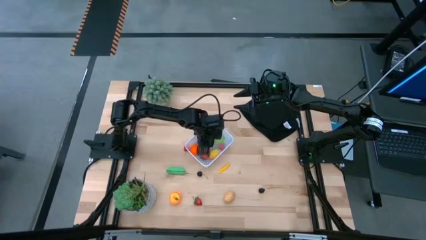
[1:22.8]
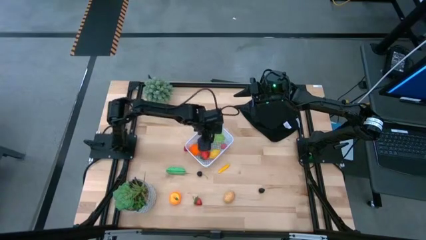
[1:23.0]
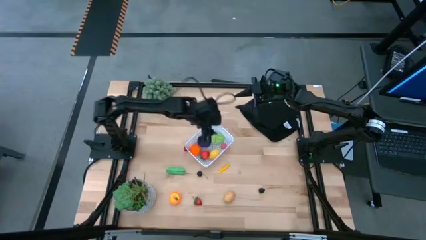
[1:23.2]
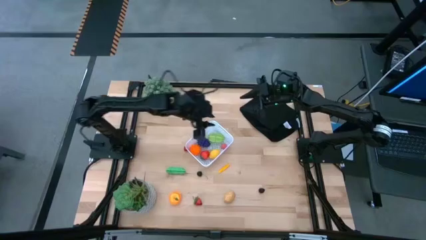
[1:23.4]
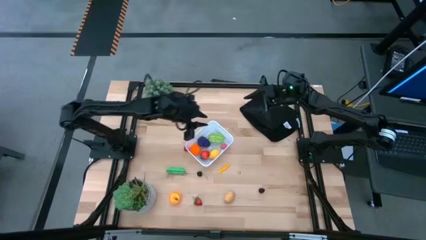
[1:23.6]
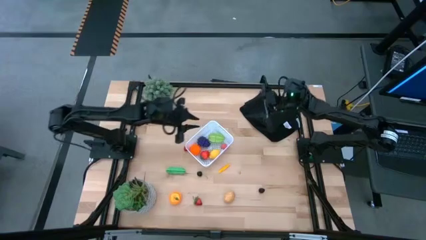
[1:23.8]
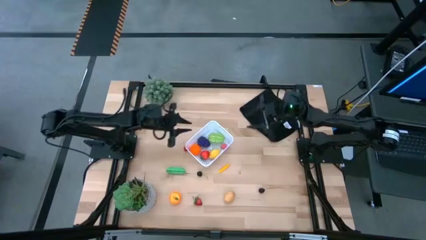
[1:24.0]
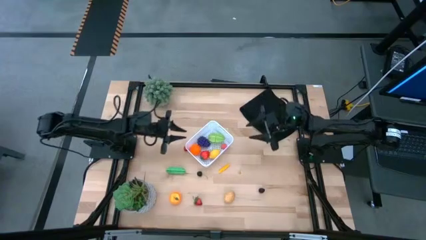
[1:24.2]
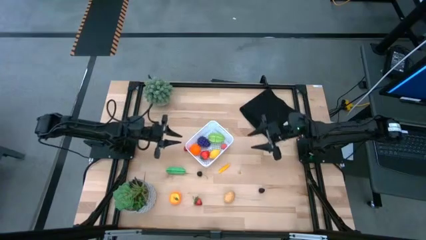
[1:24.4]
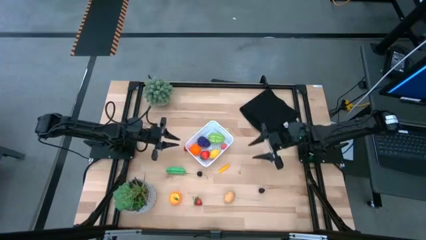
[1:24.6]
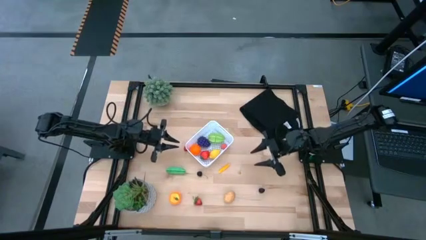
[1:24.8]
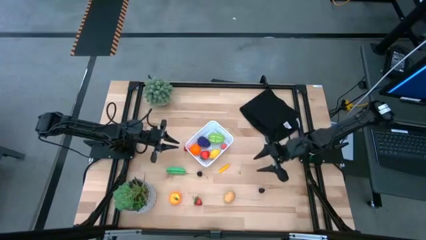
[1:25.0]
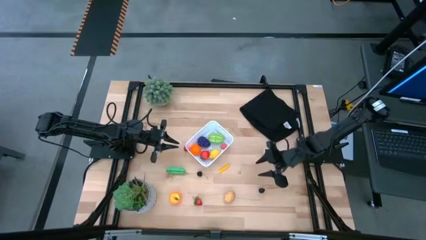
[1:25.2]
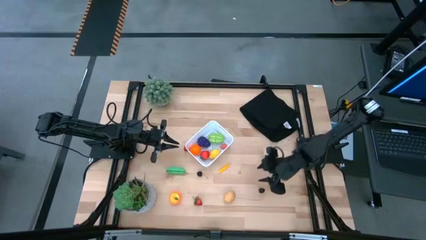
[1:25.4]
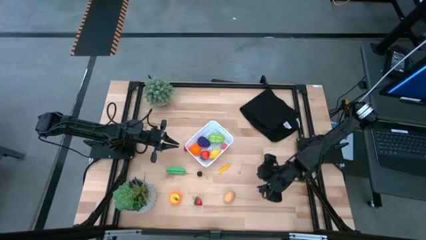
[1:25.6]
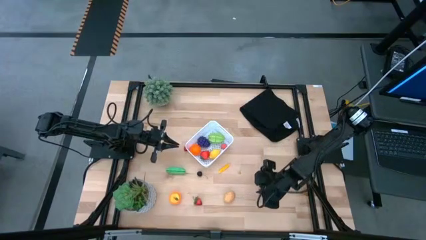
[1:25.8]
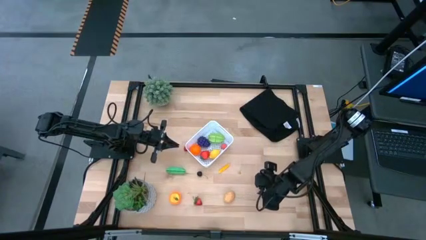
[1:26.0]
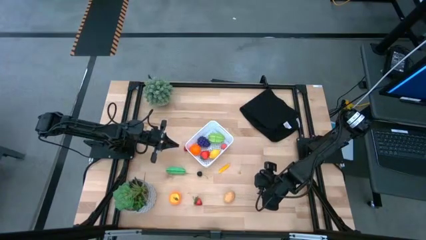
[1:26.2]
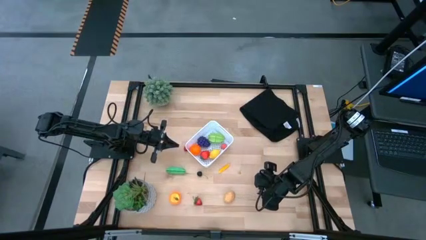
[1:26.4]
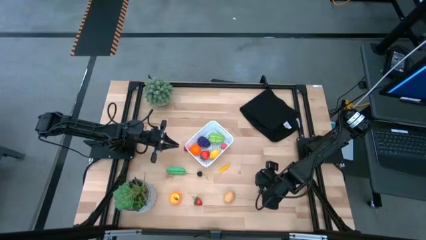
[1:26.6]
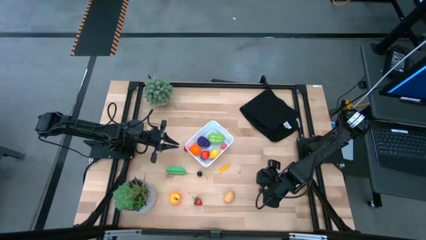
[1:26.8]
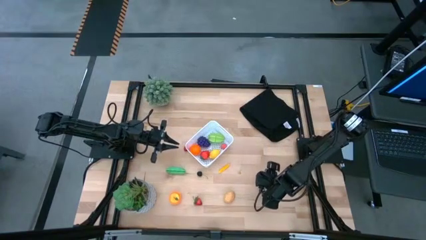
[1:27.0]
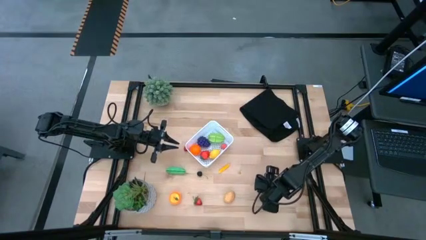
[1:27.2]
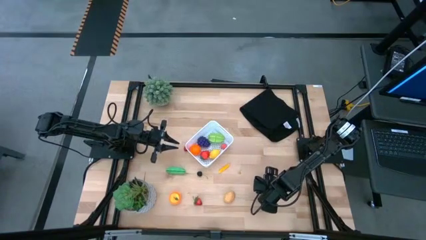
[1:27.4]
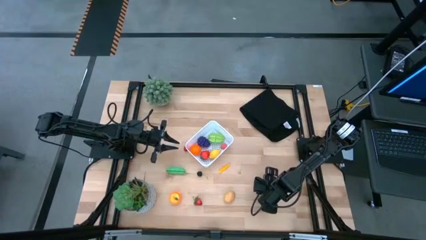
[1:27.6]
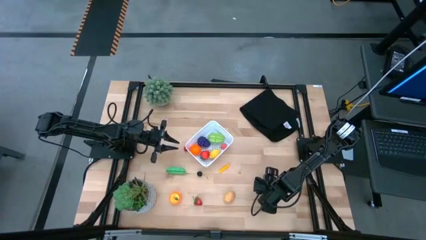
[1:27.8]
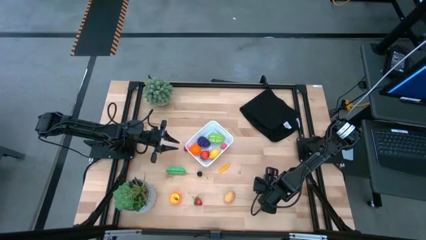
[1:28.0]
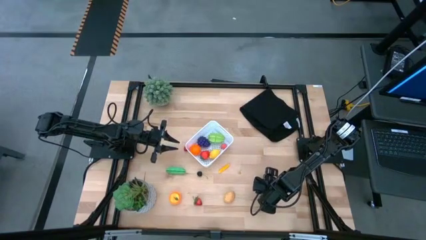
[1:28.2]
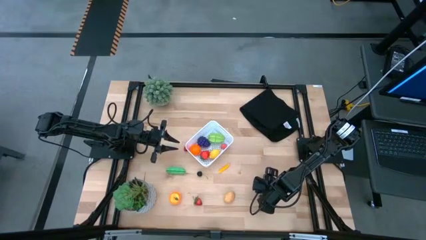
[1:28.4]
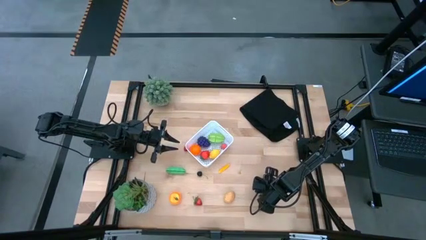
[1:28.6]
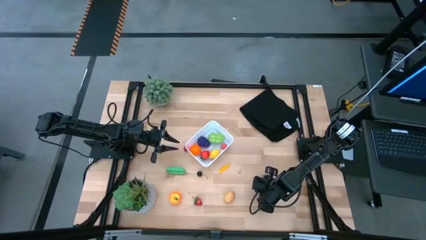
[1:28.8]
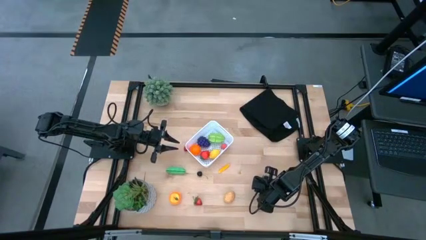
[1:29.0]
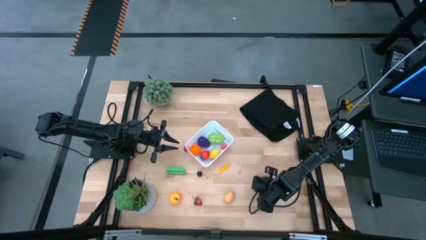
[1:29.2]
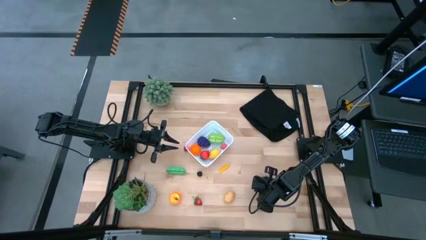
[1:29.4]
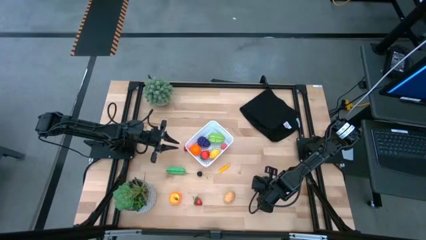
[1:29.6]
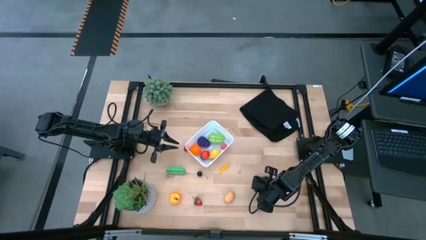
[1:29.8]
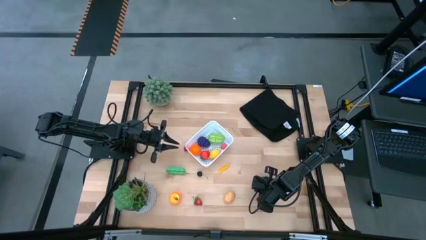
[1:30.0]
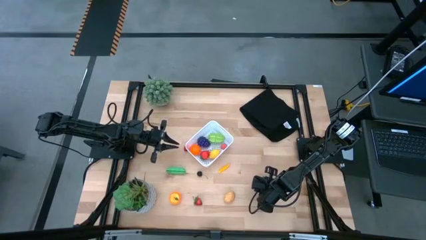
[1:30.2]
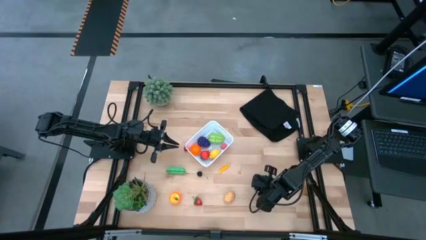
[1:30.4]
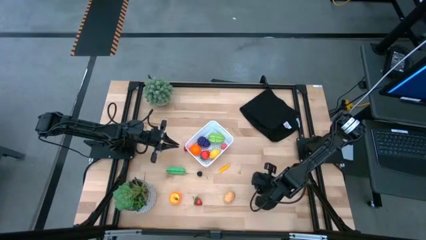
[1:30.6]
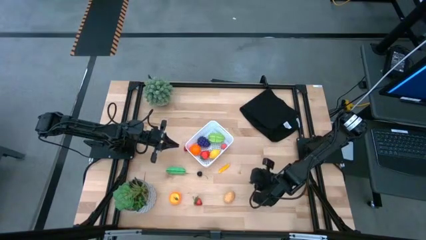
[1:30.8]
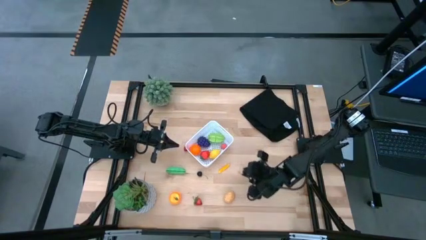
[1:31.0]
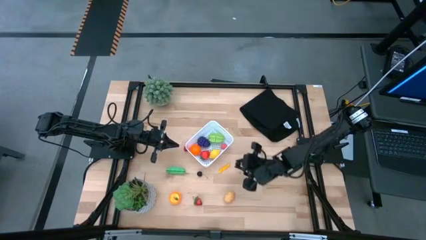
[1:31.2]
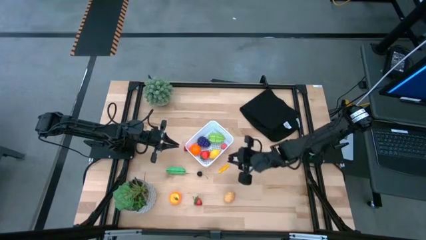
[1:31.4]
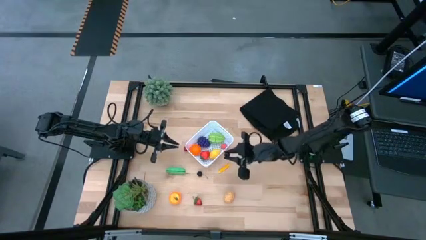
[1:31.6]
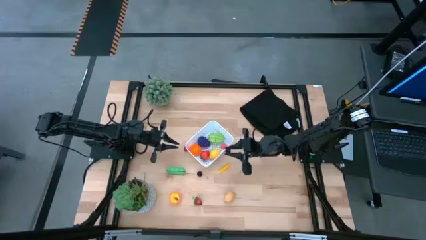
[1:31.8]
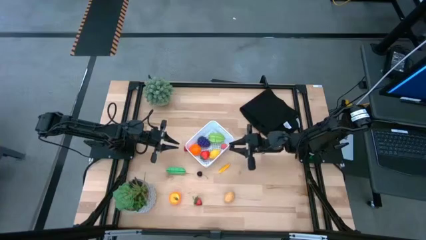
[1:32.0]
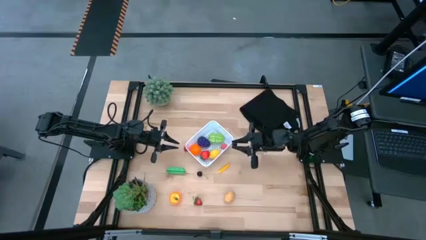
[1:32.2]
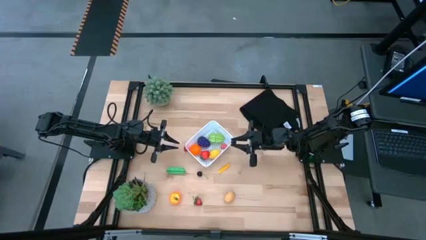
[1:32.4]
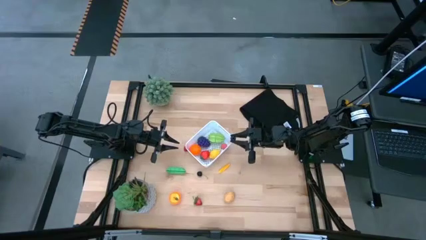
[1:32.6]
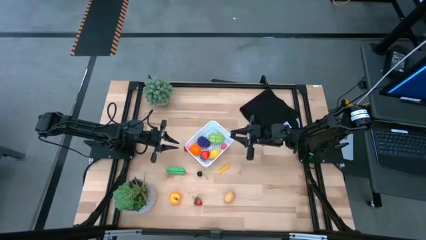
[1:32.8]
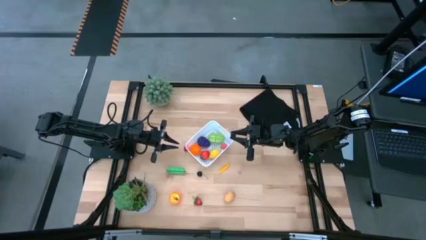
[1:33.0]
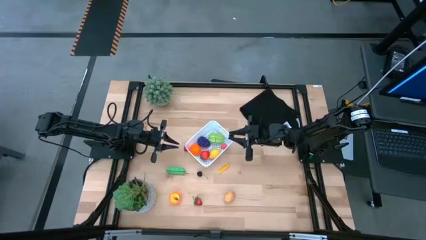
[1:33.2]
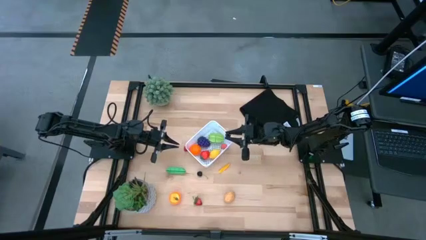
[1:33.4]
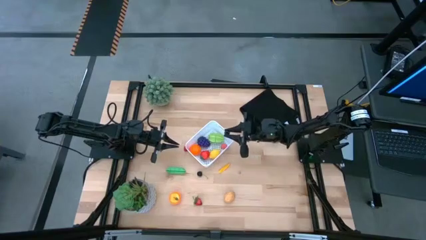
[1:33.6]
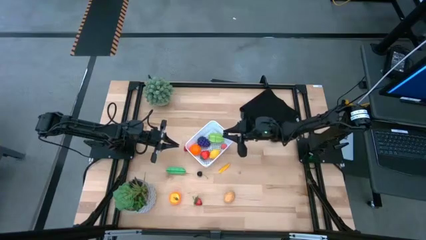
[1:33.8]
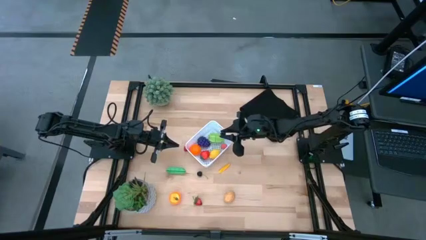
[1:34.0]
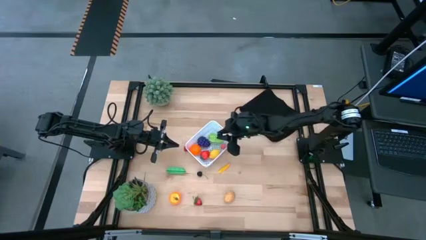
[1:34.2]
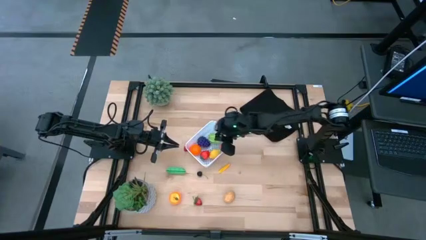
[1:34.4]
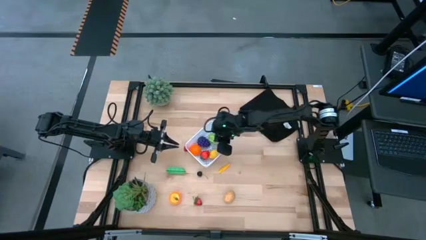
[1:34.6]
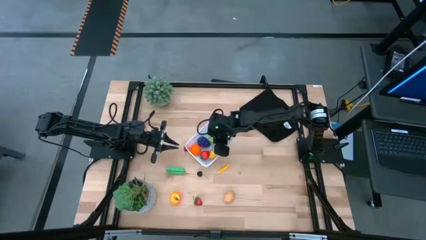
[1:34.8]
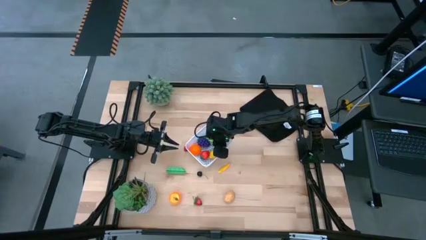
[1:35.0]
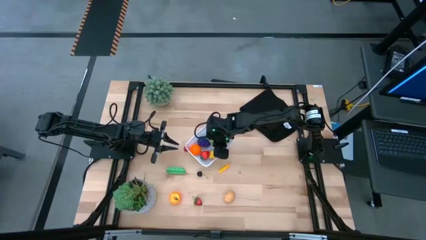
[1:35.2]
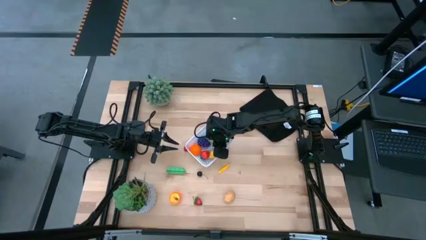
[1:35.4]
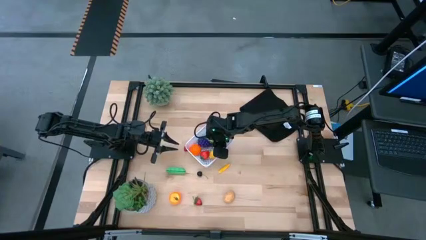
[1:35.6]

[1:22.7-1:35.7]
Task: Pick and placing Produce into tupperware
Put the blackberry into the white bin

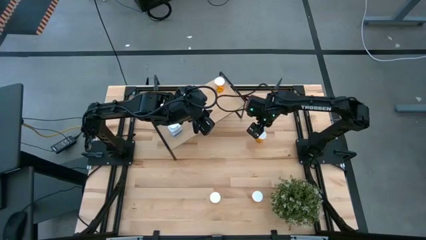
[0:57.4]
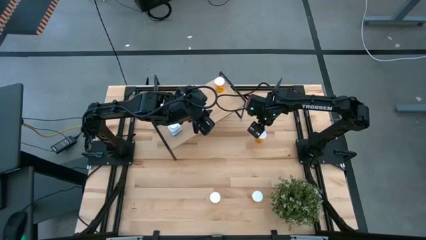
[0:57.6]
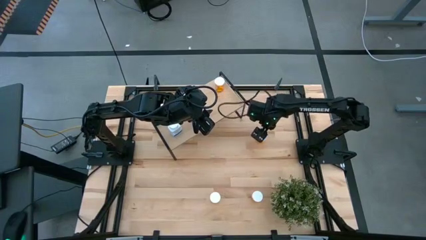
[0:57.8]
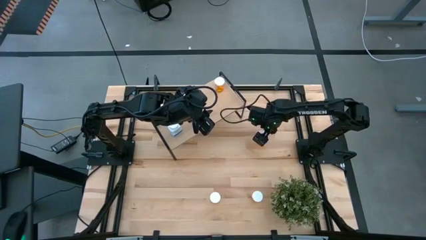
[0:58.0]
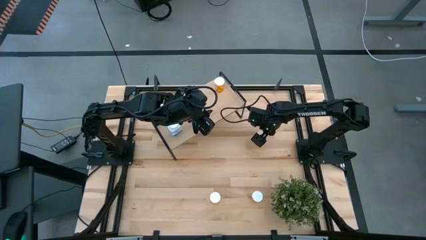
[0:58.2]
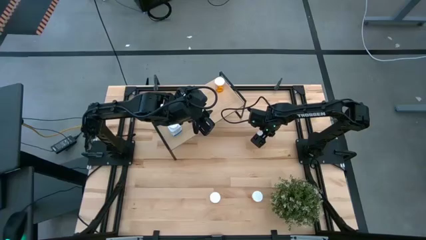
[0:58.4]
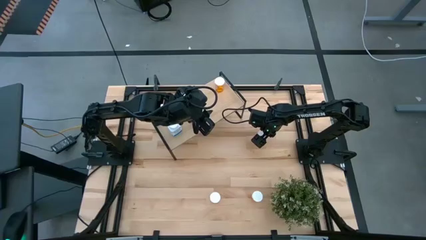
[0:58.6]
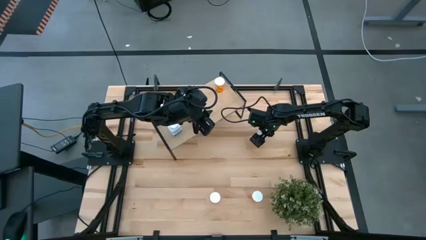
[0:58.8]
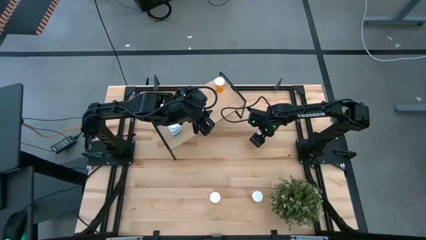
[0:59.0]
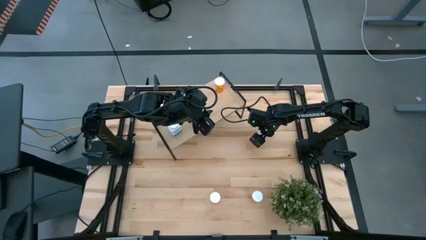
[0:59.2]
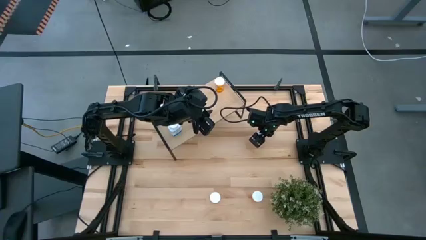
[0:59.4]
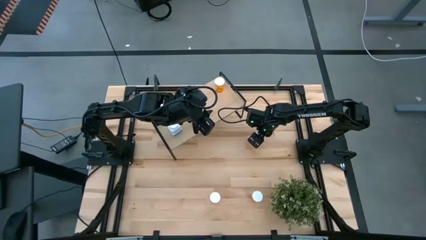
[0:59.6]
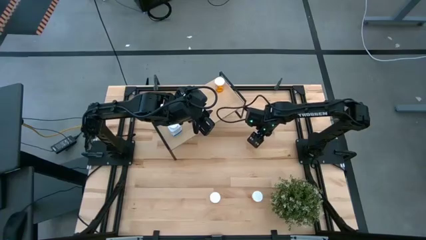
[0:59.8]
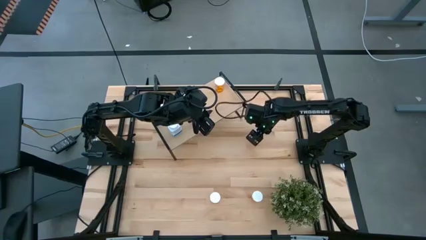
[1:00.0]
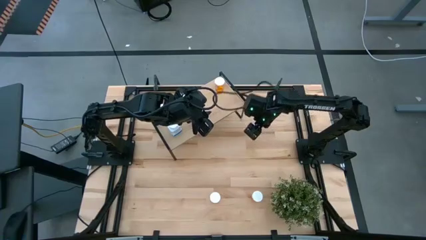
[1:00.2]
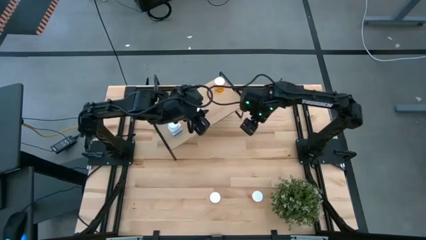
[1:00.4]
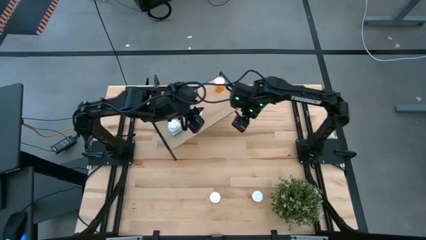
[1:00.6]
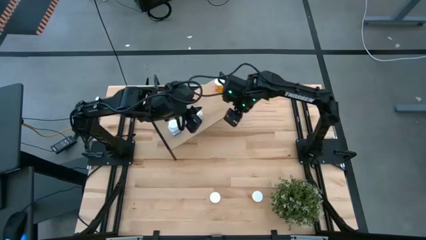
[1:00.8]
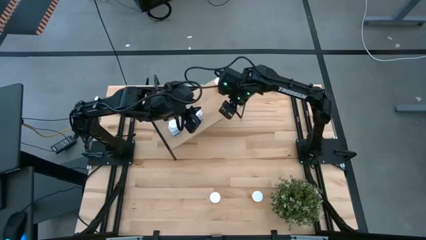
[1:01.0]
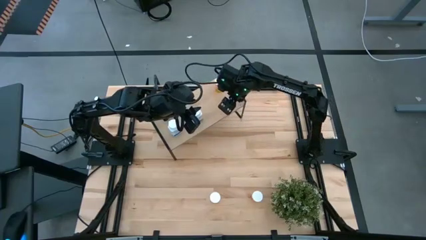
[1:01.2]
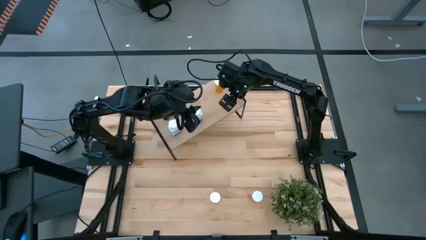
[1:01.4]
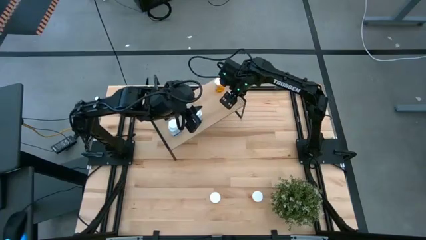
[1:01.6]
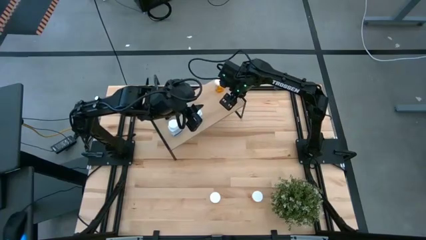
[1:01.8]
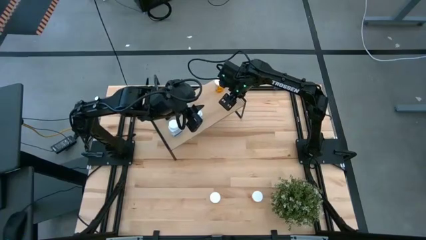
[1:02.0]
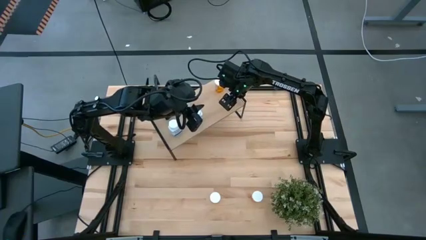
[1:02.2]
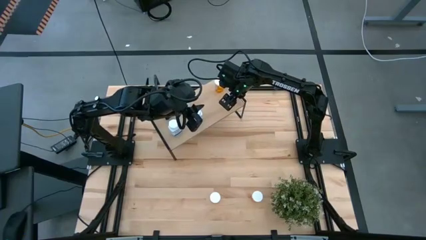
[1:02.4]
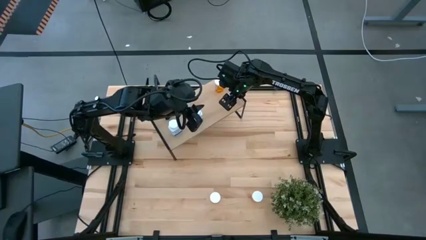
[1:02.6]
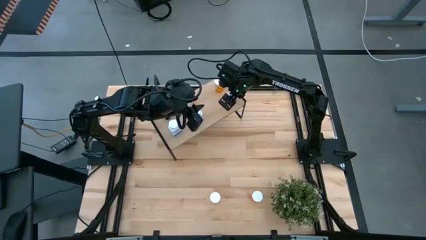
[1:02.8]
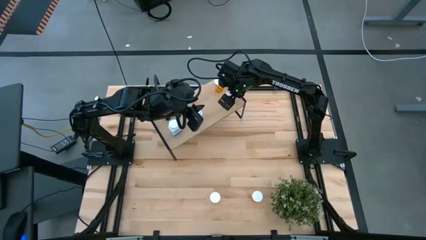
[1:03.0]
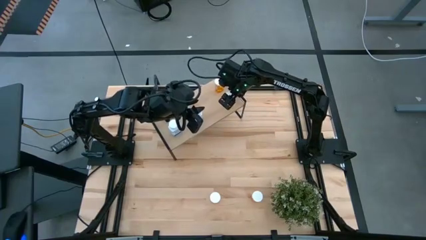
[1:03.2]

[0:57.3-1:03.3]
Task: Pick and place medicine bottles onto shelf by color
Put the orange pill bottle on the shelf aligned with the other orange pill bottle
